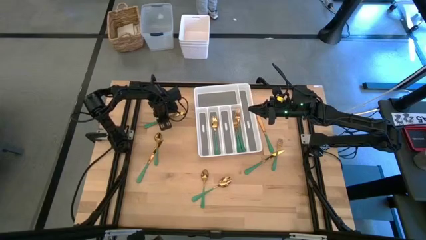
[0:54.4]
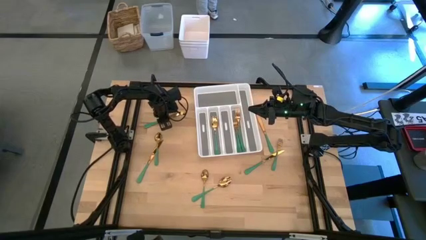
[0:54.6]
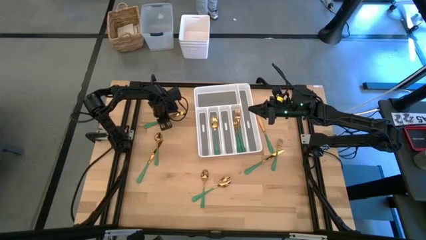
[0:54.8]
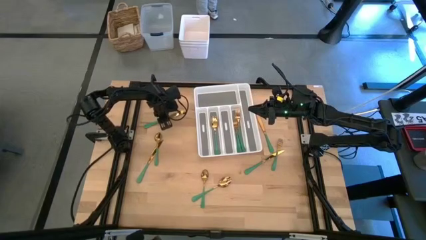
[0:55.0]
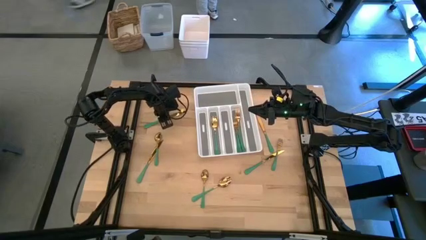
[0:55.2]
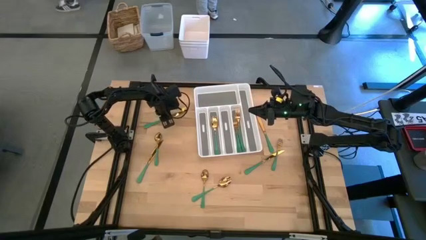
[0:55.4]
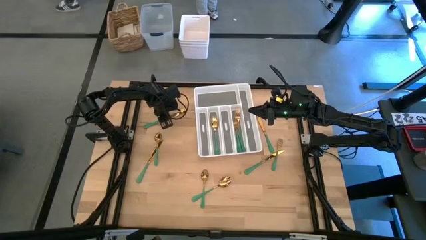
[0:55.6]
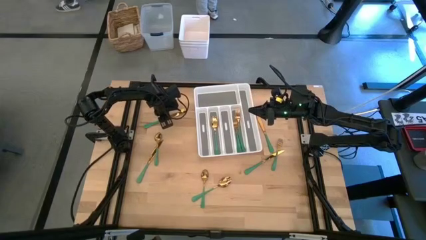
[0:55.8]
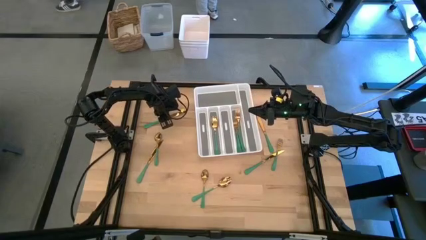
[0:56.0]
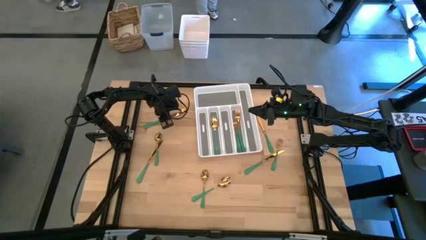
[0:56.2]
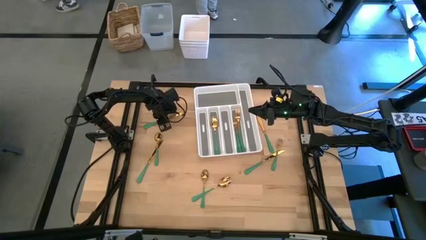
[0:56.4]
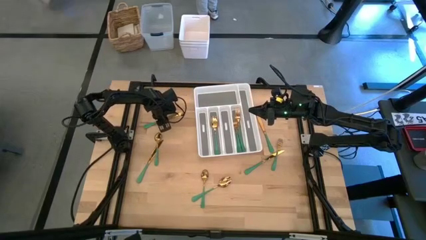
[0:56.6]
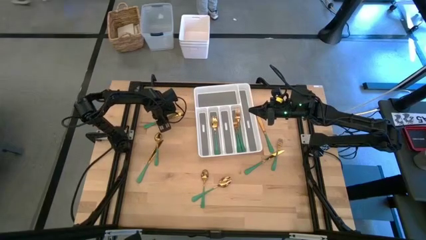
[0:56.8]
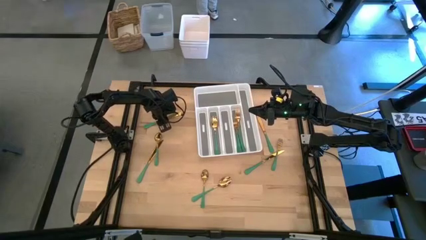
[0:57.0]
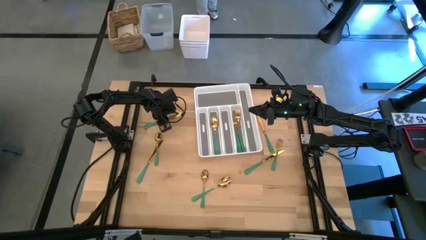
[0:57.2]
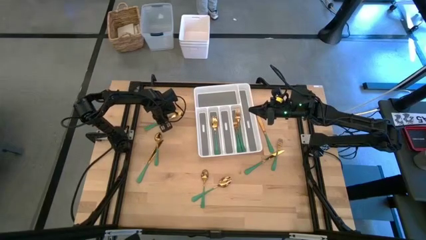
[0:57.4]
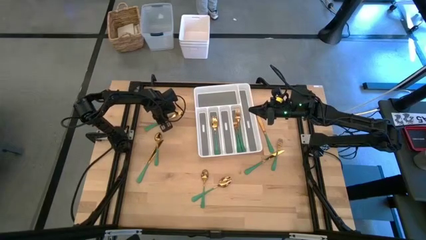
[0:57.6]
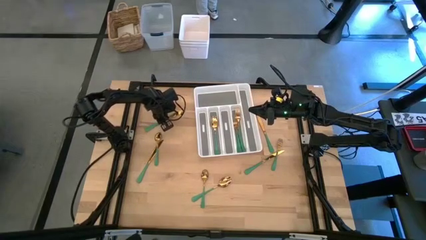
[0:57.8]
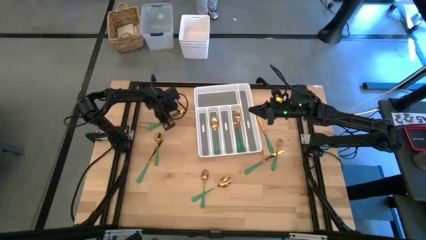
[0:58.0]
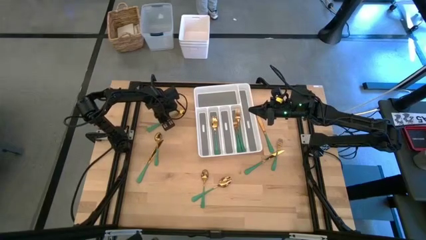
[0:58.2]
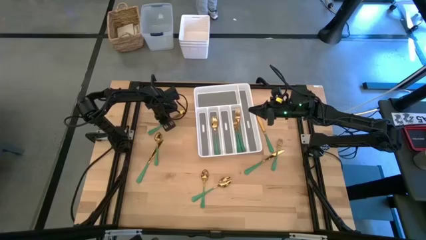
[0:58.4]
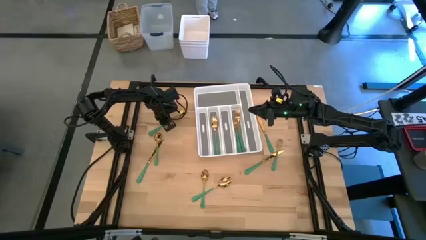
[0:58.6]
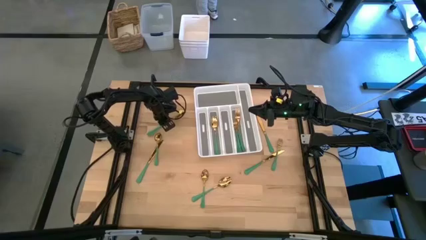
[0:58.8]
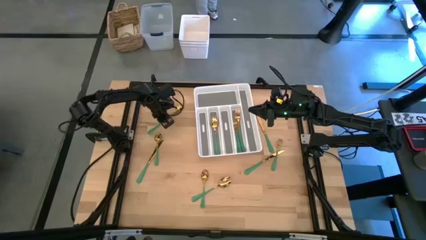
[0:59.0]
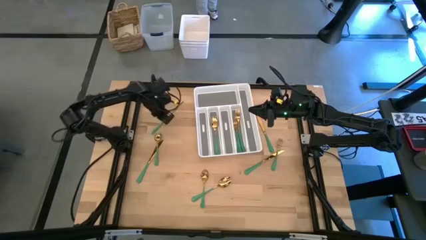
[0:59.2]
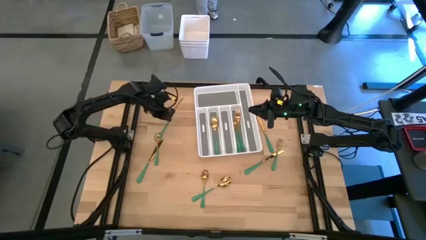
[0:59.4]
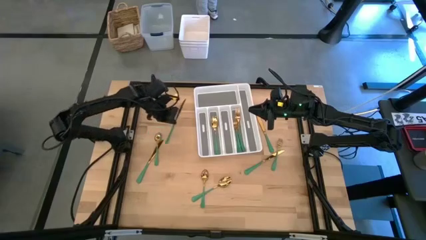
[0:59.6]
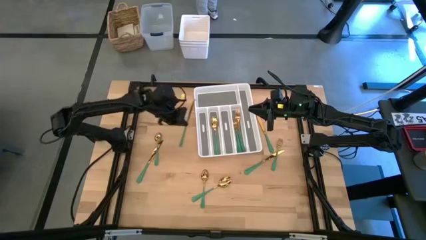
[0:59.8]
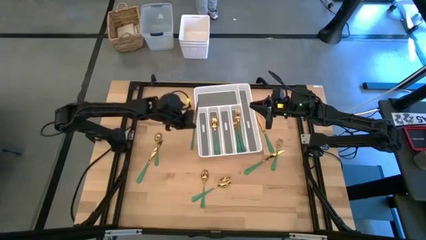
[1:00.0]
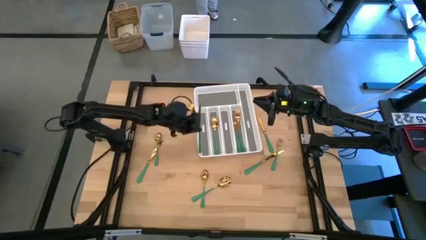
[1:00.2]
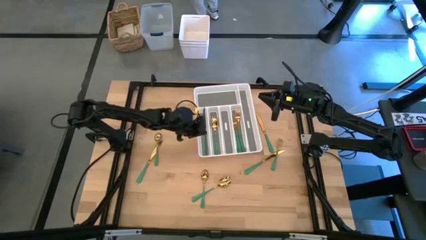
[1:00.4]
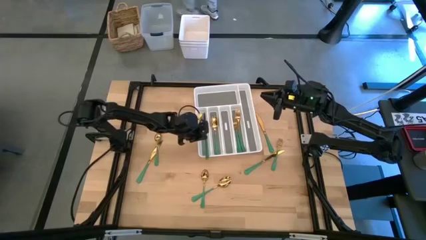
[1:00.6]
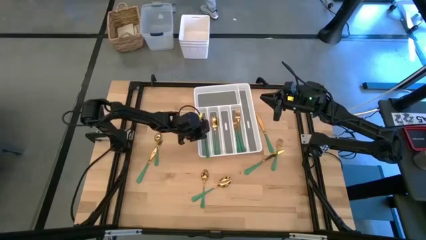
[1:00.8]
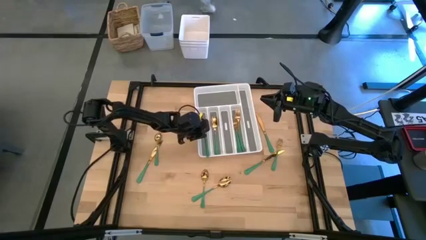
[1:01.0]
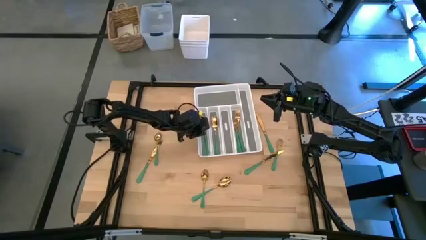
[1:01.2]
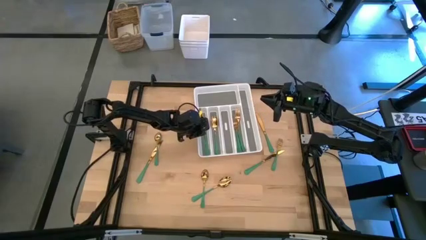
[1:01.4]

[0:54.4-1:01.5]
Task: Sort silverware
Put the top left knife into the silverware organizer

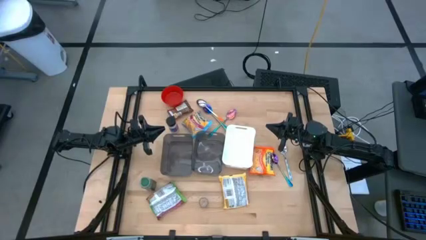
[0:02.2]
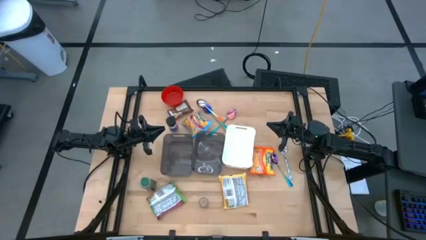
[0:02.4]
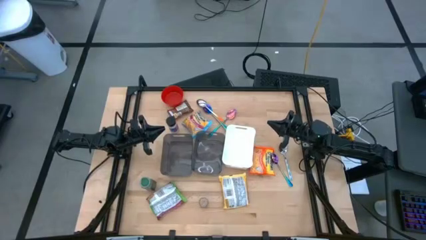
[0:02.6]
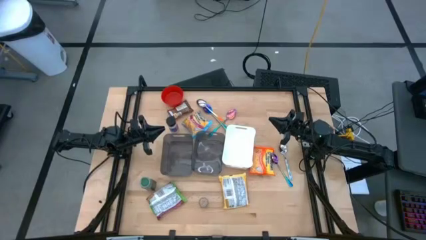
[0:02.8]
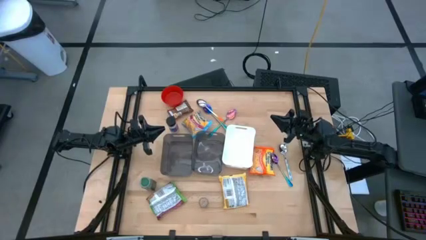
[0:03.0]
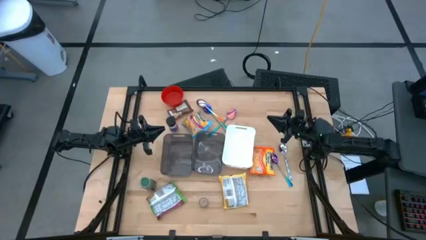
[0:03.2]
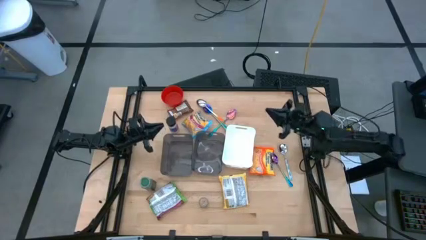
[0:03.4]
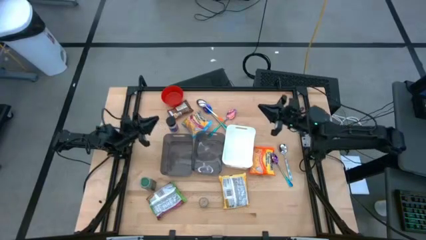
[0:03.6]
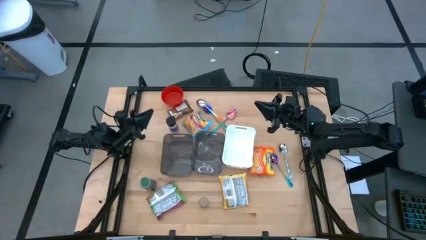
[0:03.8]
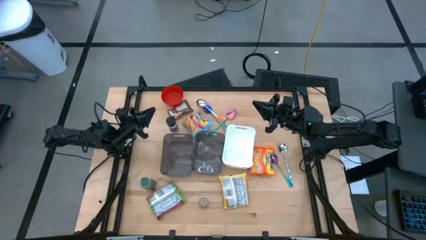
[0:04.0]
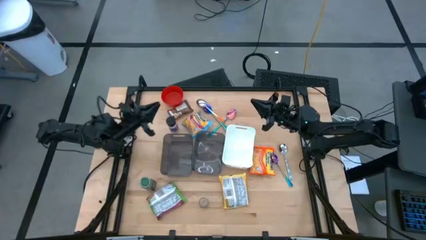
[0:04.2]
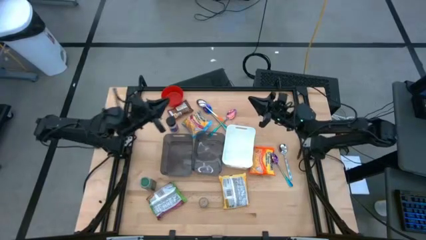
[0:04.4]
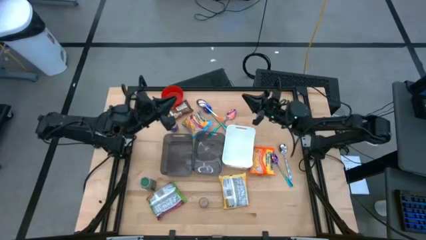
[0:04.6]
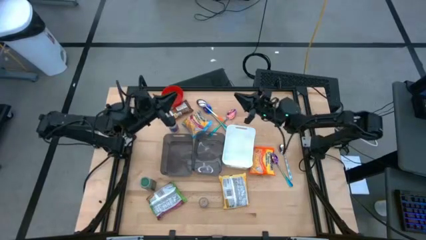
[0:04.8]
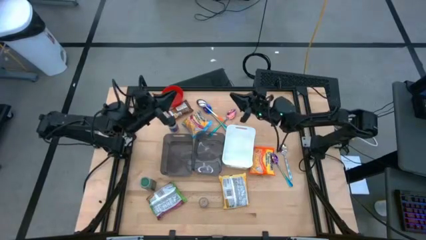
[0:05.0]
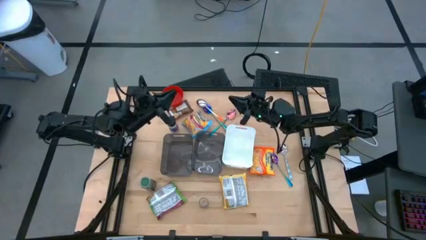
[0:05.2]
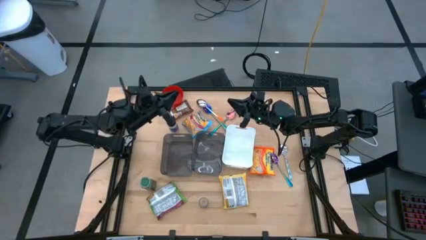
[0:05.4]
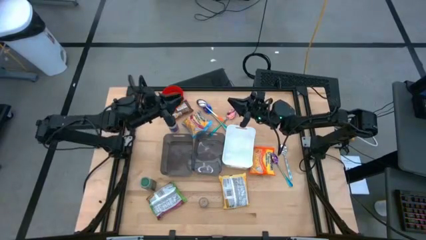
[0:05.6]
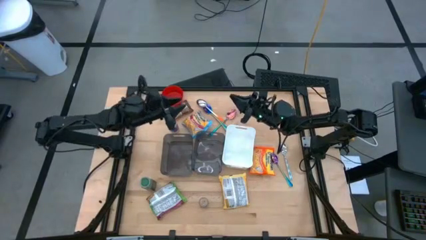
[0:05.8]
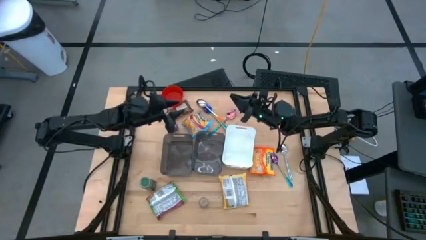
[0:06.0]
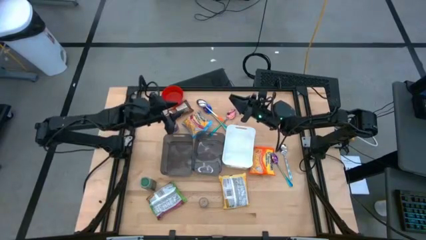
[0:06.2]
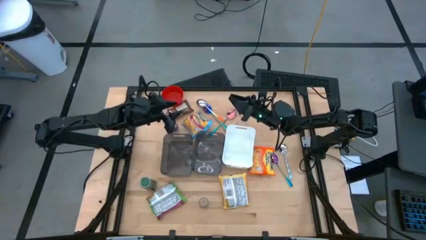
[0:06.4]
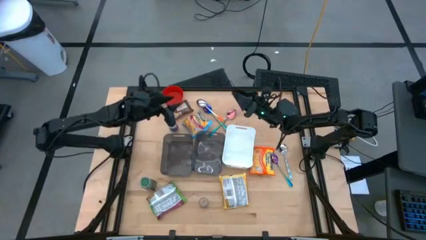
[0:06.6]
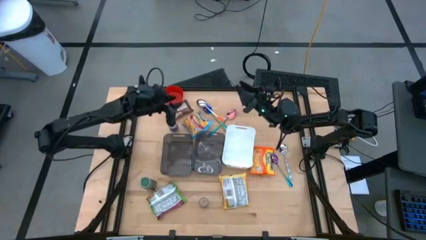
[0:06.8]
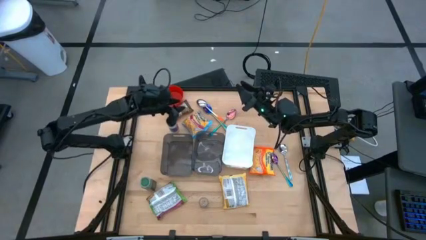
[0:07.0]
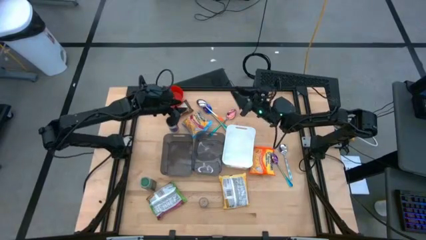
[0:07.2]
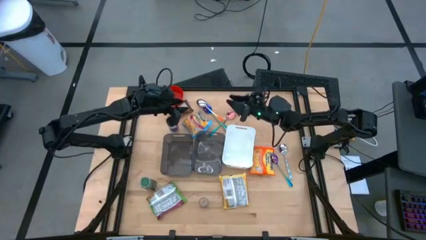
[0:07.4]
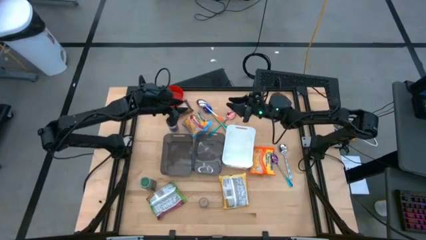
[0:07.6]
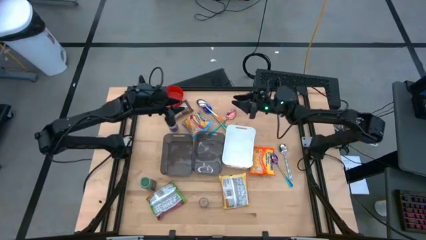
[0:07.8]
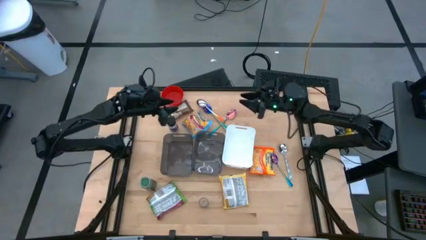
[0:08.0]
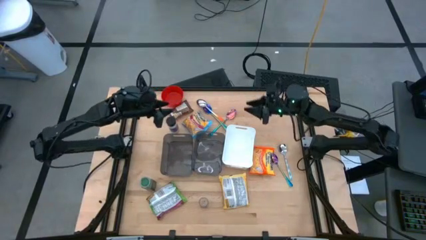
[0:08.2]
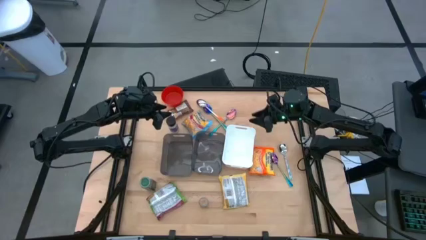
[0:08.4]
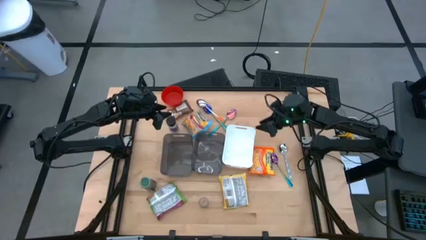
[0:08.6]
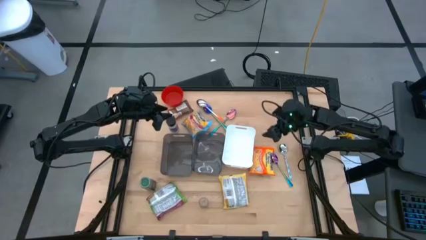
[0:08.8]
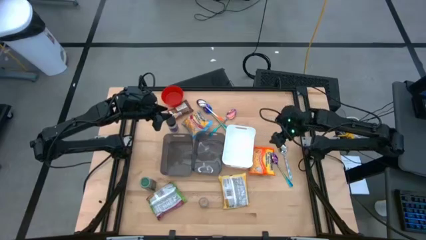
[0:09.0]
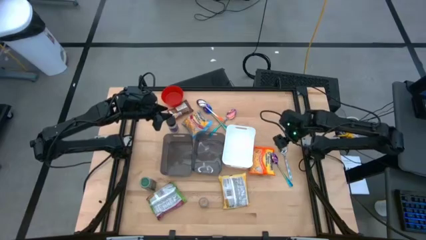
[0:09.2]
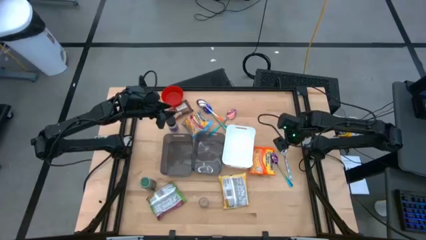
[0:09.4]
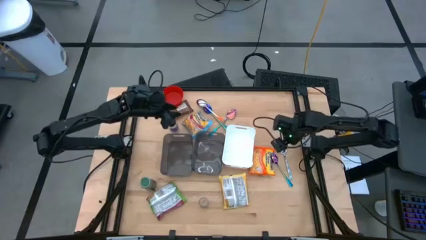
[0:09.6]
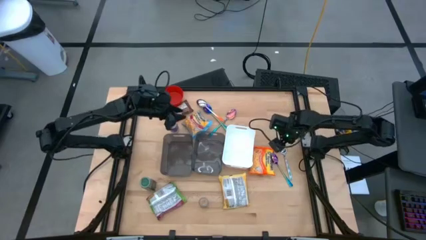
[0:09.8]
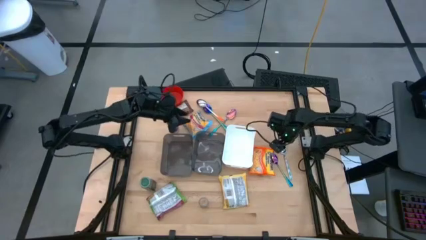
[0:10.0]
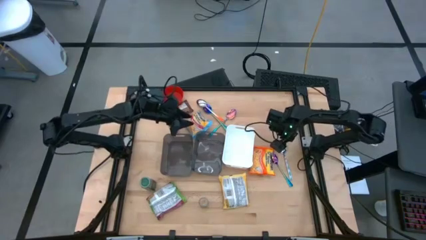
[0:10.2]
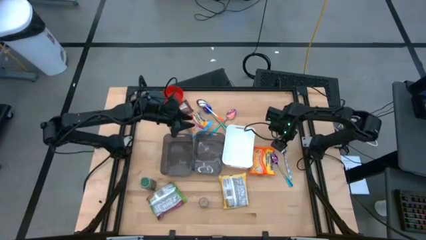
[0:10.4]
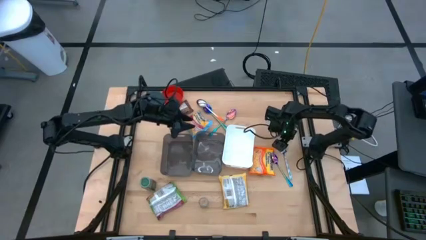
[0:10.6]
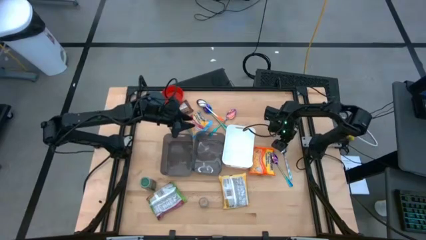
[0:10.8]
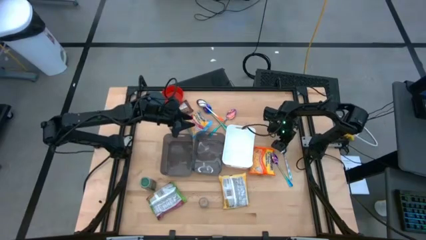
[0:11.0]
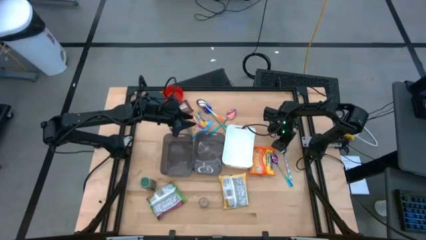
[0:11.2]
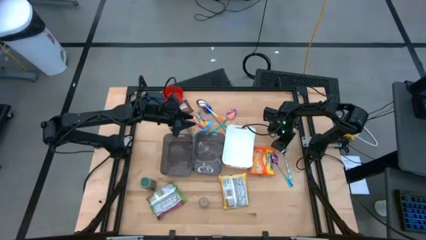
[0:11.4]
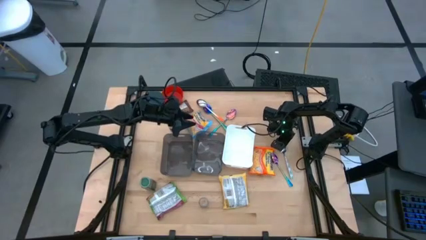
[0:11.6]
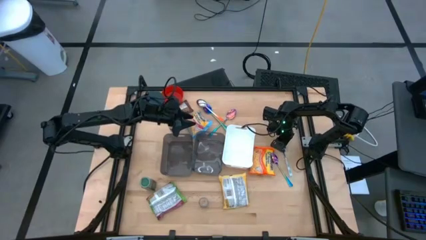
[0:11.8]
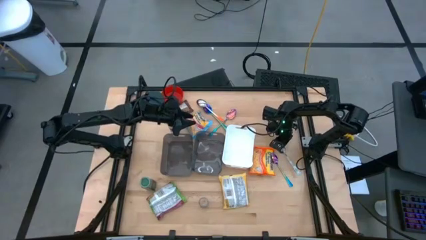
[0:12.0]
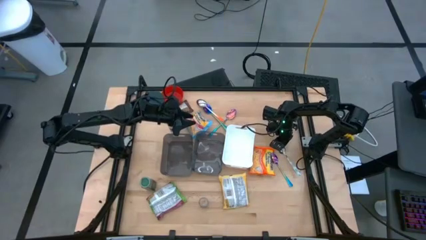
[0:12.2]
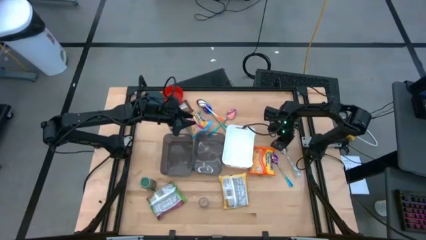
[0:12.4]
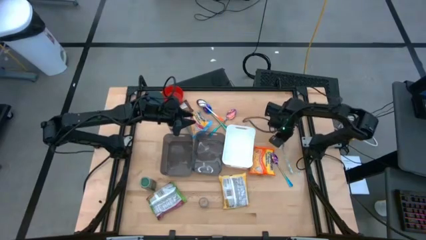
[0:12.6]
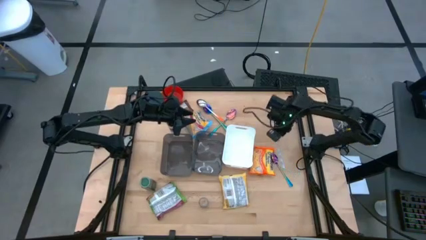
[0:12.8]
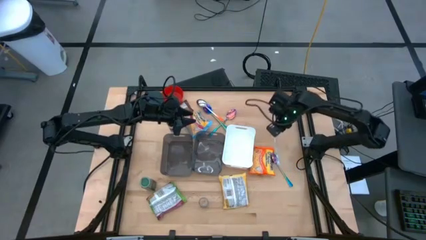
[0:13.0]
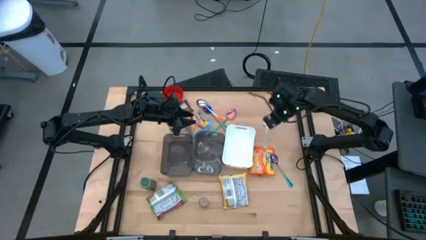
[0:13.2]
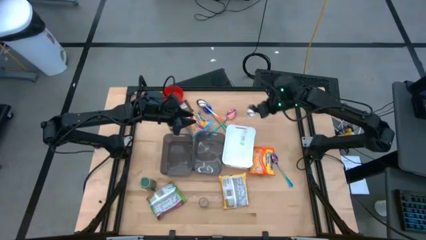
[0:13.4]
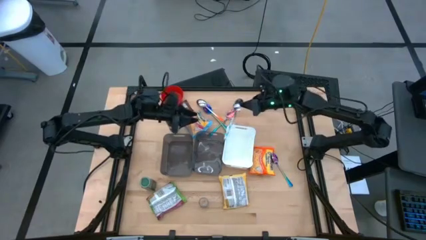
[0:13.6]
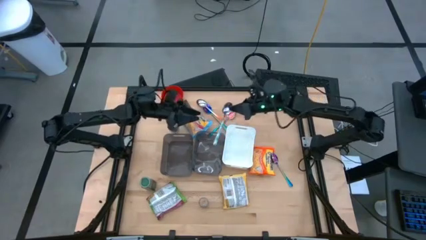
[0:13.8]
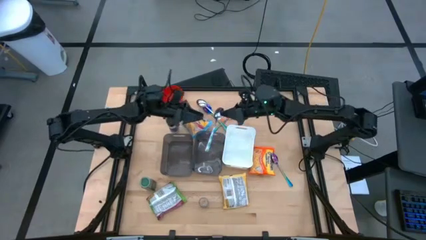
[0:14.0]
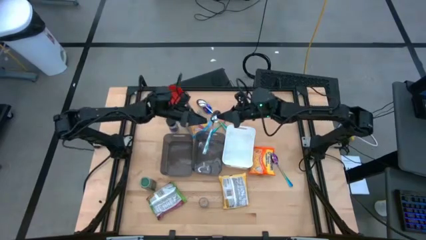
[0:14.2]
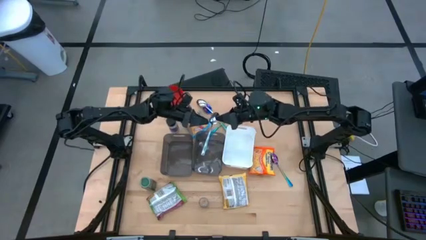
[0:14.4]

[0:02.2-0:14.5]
Task: Pick & Place Food Item
Put the white spoon into the right gray bin
